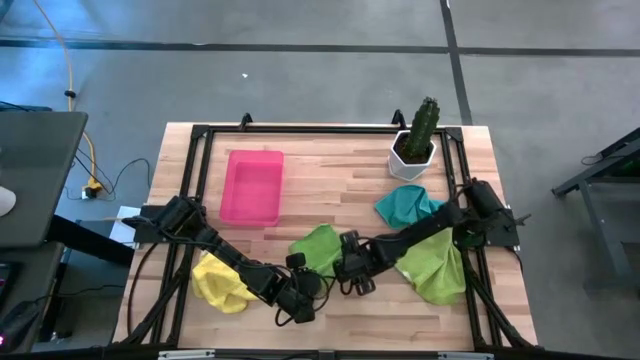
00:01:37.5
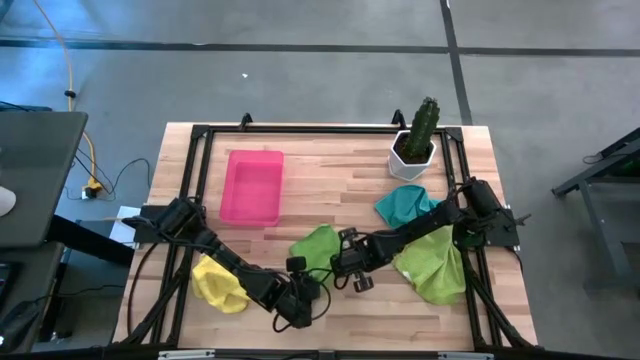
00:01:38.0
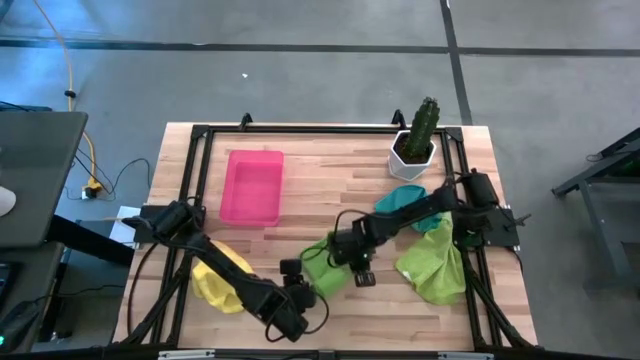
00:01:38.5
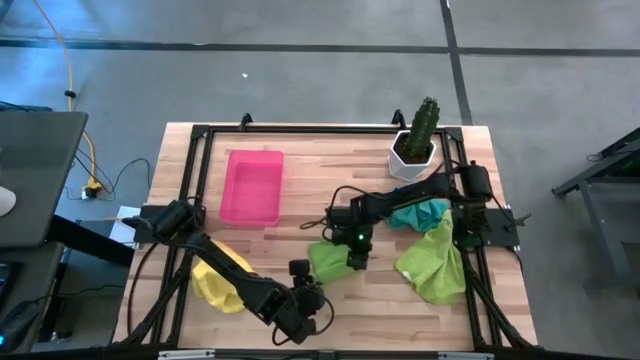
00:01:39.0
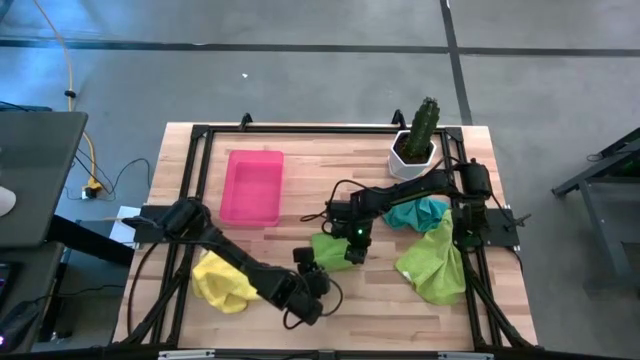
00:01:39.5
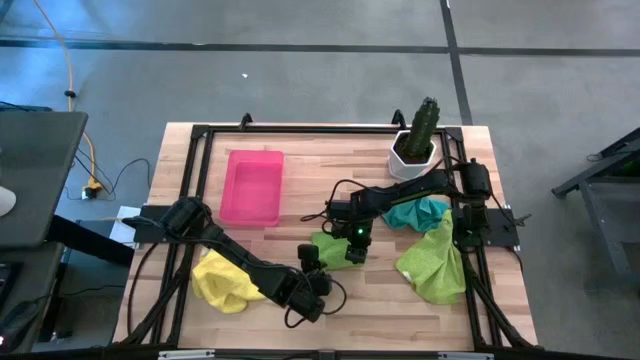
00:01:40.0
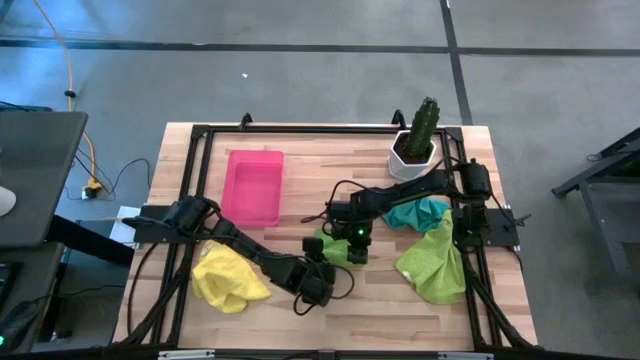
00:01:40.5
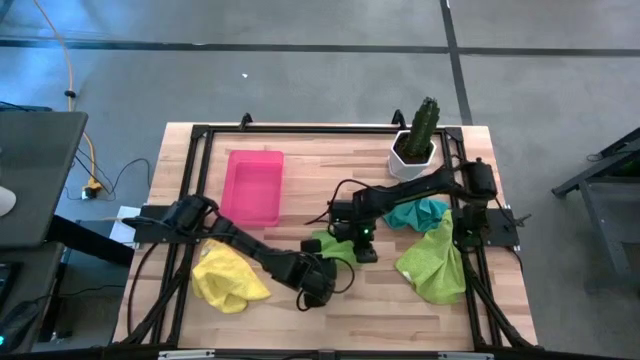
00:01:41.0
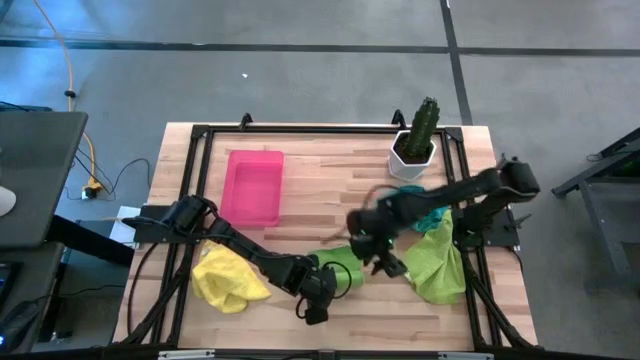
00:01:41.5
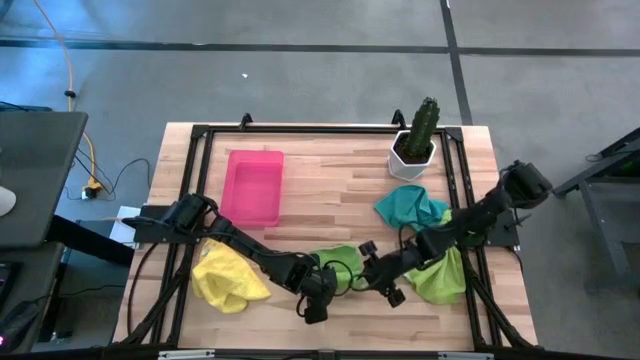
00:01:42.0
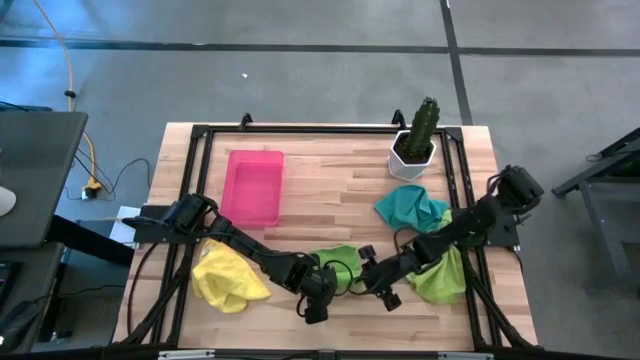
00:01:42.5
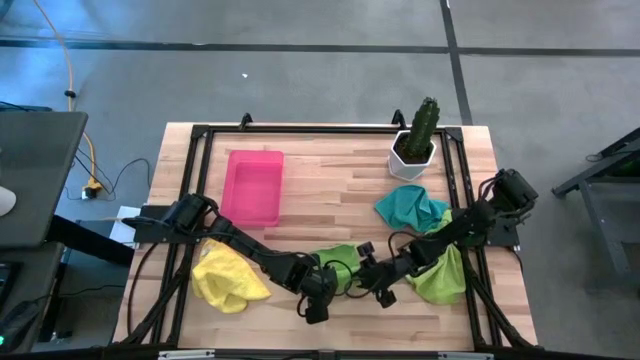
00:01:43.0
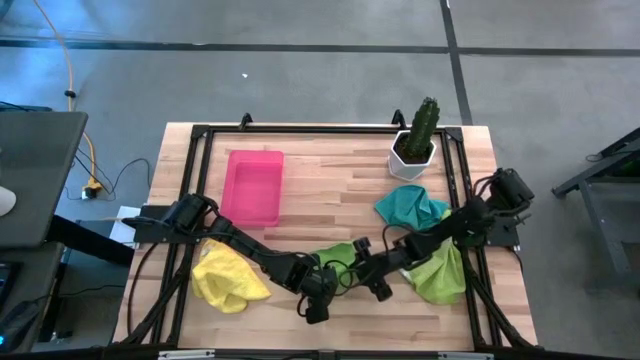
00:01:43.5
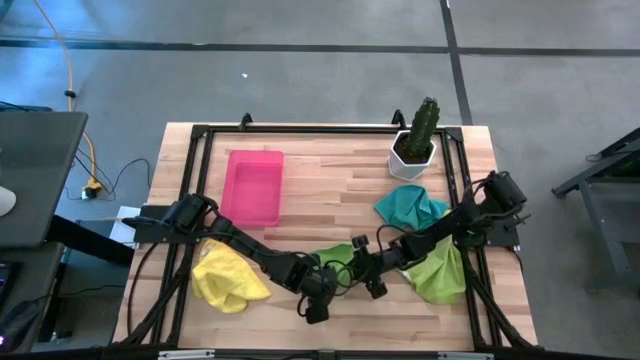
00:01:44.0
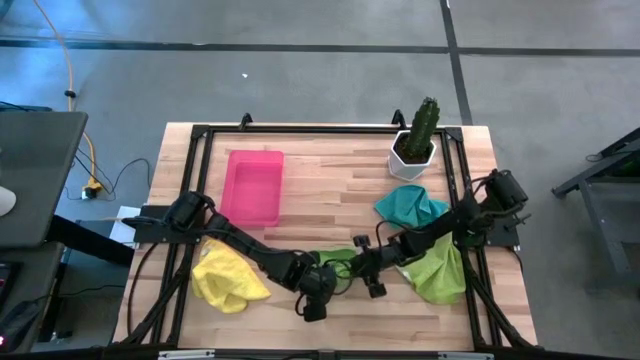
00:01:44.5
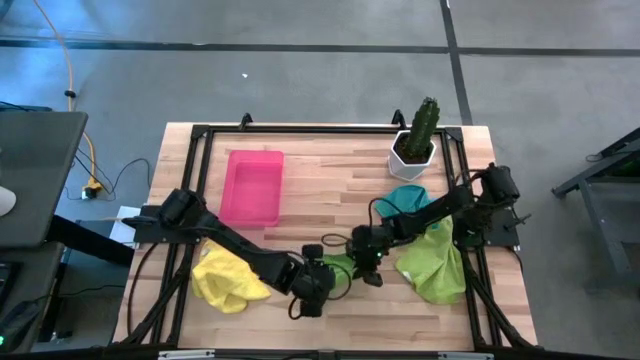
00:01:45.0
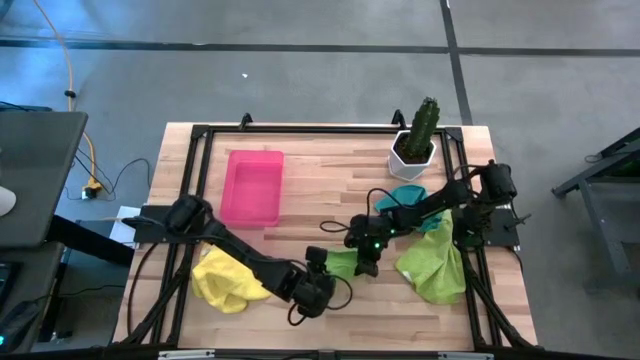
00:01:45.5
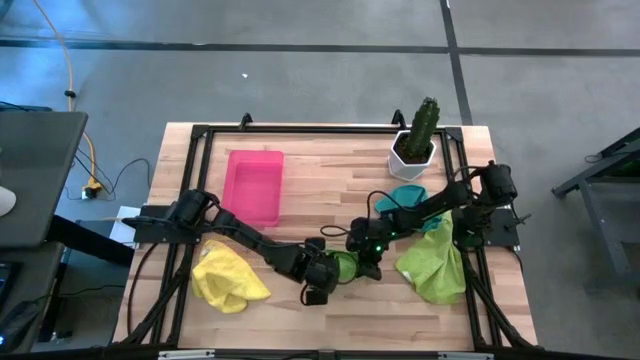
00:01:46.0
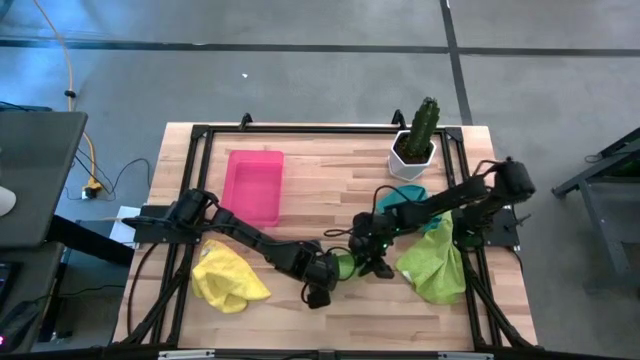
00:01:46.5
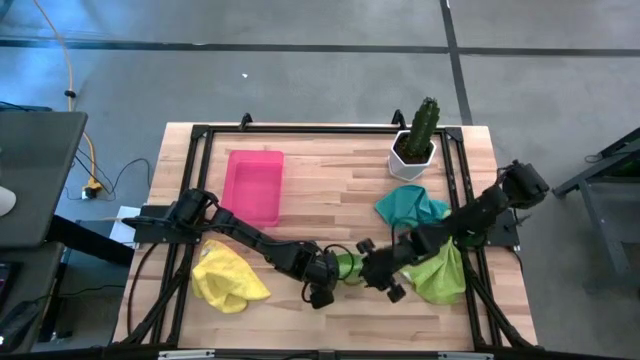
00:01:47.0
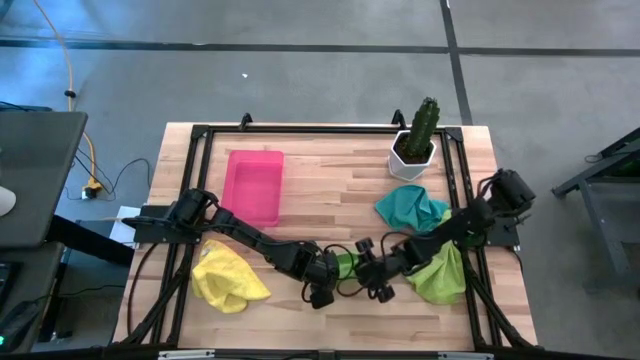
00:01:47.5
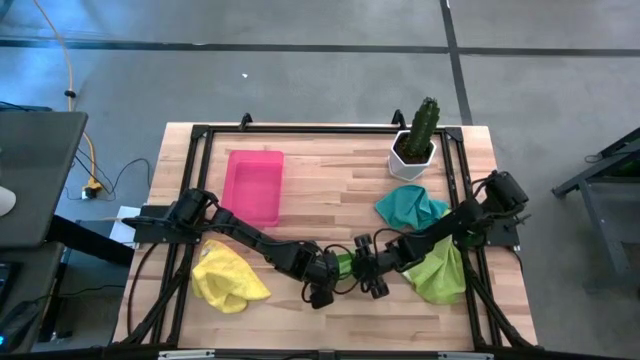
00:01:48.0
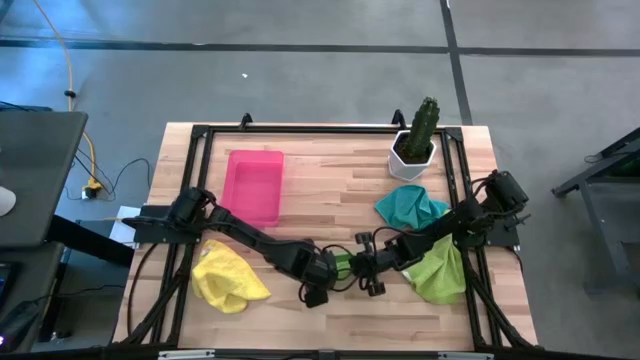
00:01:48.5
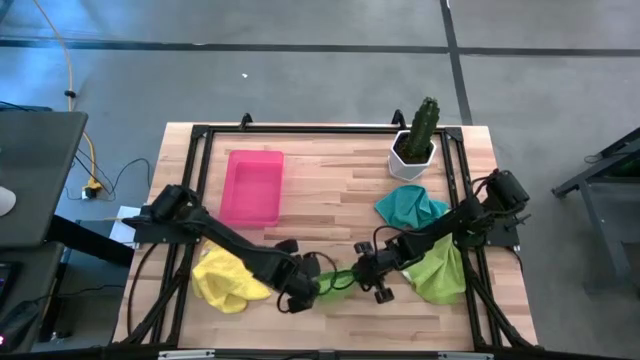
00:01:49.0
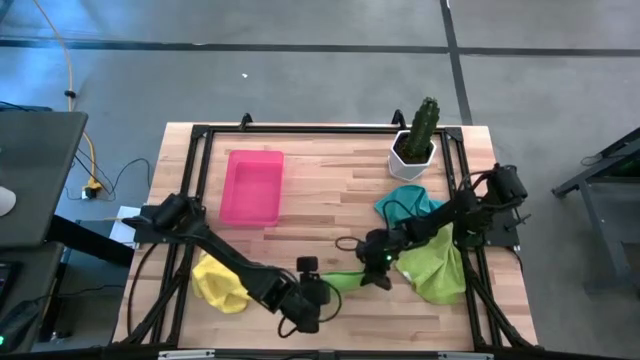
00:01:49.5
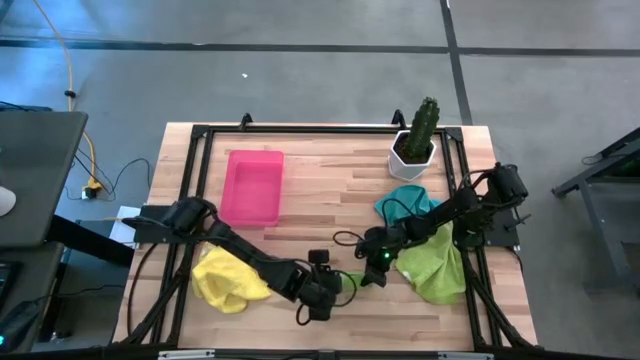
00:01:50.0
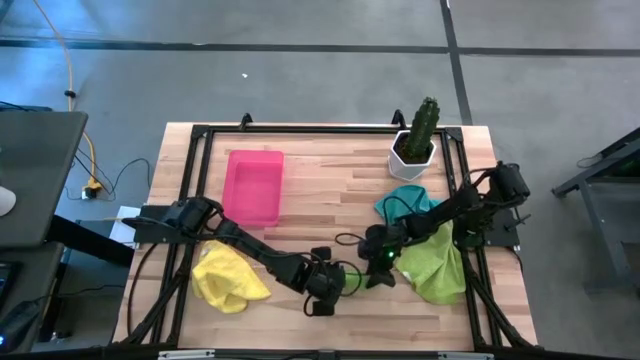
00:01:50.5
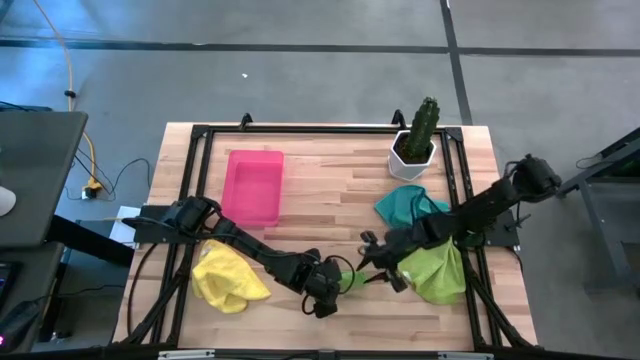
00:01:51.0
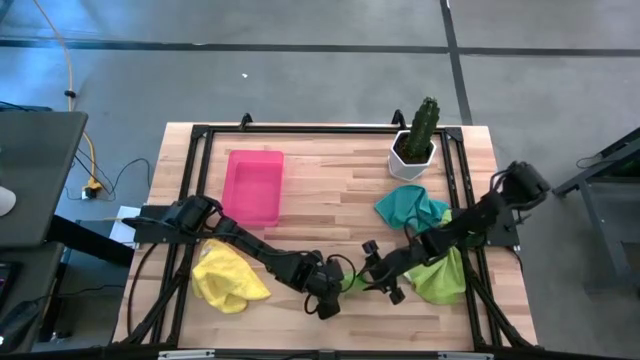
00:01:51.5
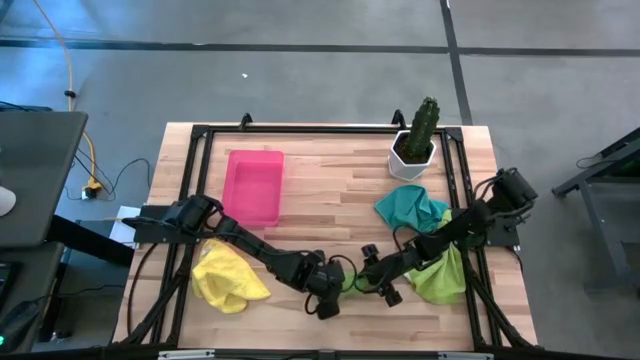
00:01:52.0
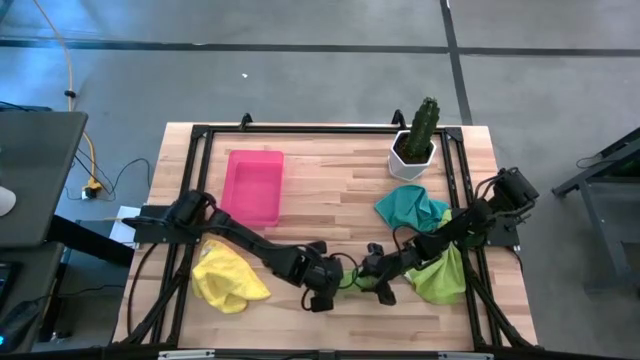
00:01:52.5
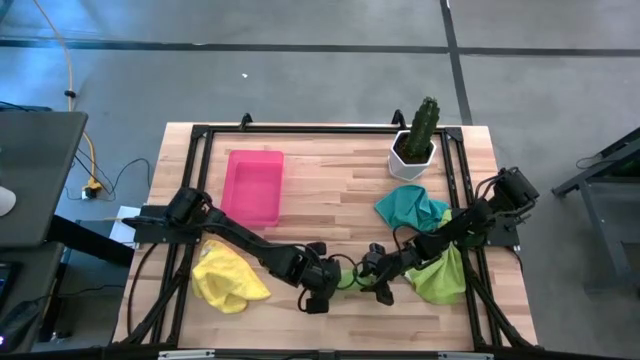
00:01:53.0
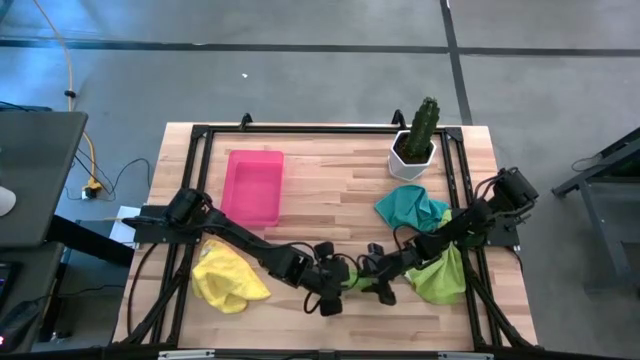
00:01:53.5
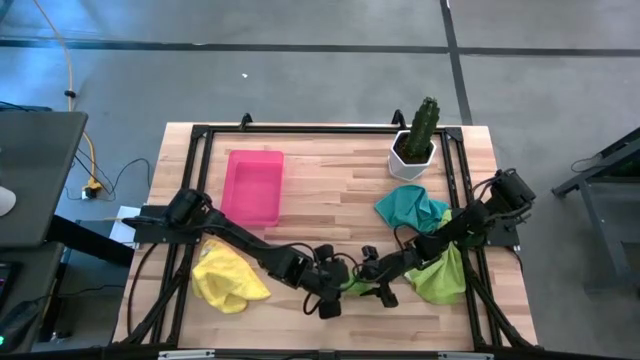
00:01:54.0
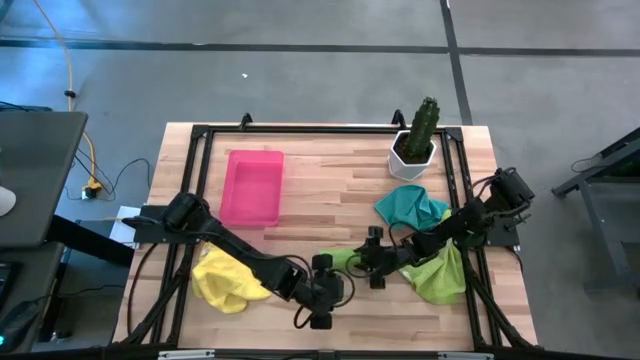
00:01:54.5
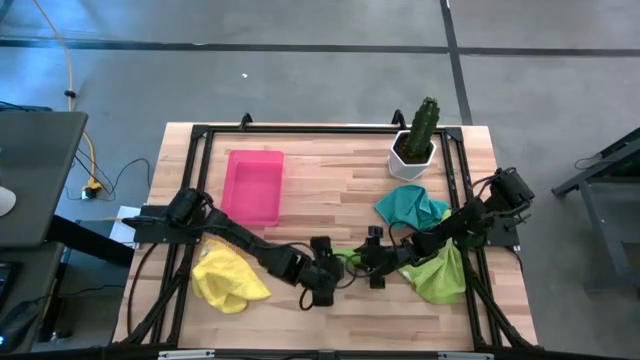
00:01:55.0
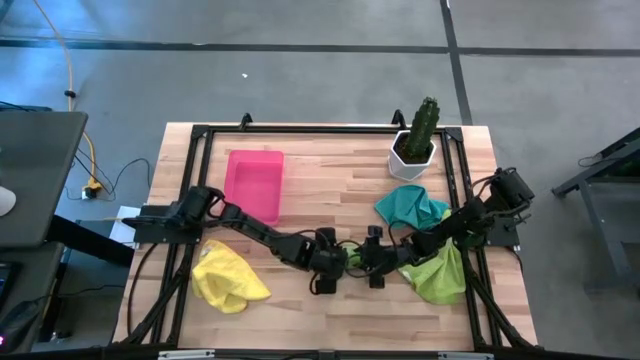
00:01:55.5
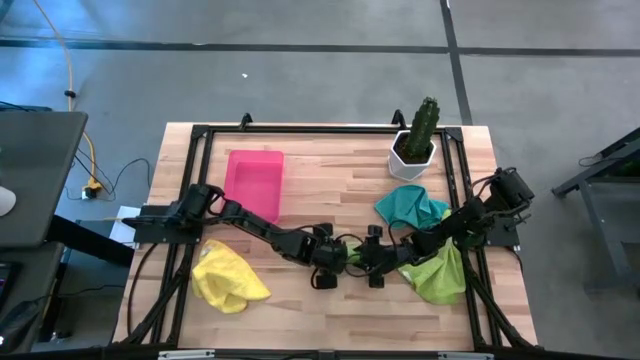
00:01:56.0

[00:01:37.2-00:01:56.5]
Task: Roll microfiber towels into tight, uniform cylinder then place into a basket
Roll the green microfiber cloth

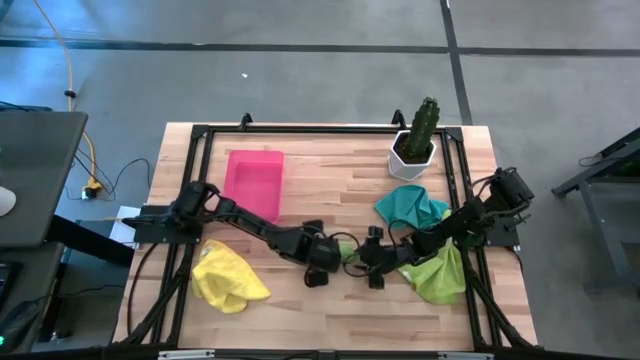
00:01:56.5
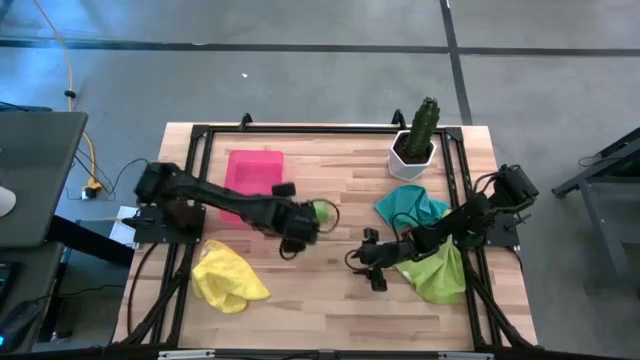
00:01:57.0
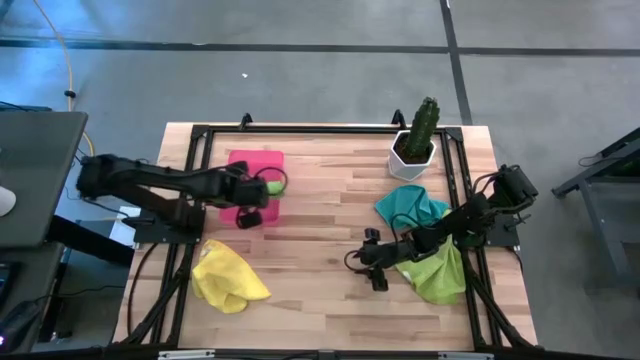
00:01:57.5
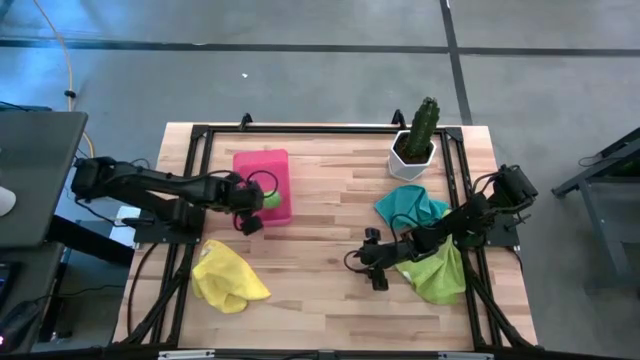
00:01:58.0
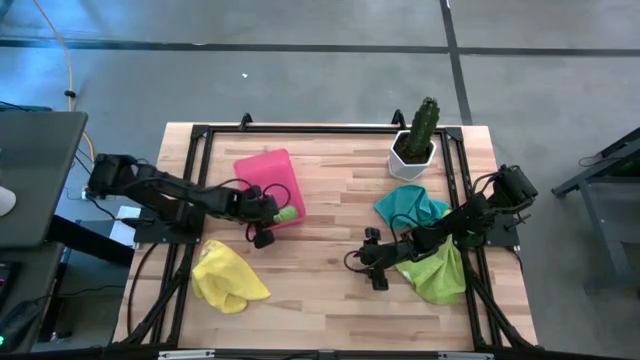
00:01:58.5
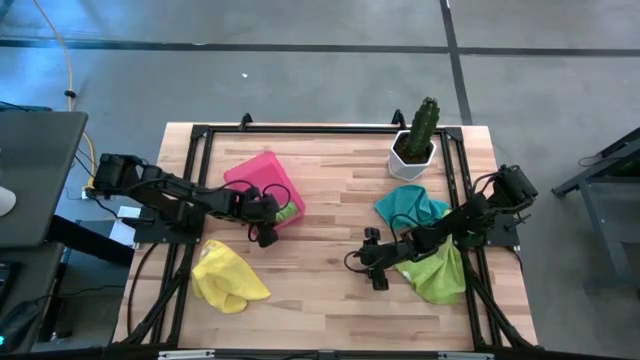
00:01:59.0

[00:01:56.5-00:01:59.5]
Put the rolled green microfiber cloth into the pink bin

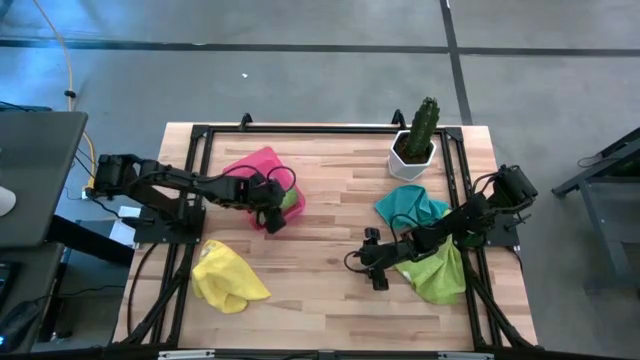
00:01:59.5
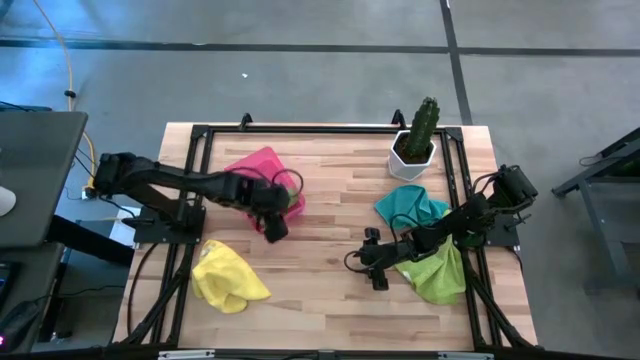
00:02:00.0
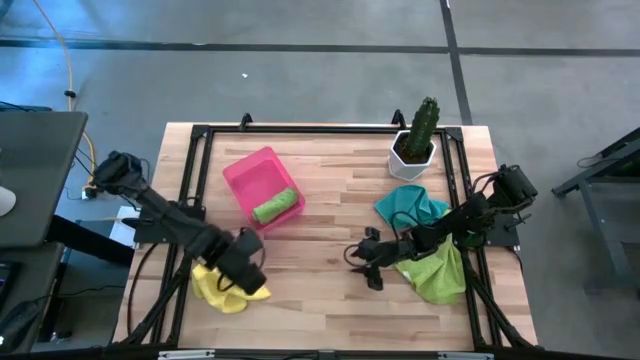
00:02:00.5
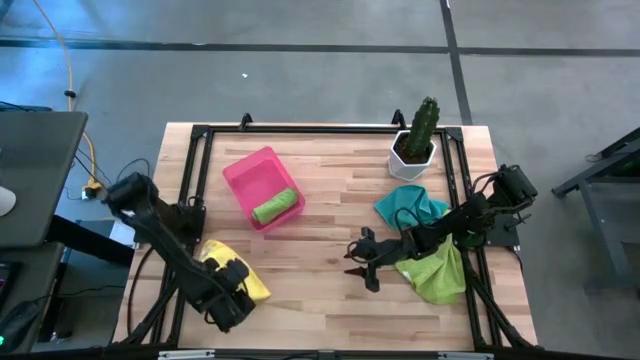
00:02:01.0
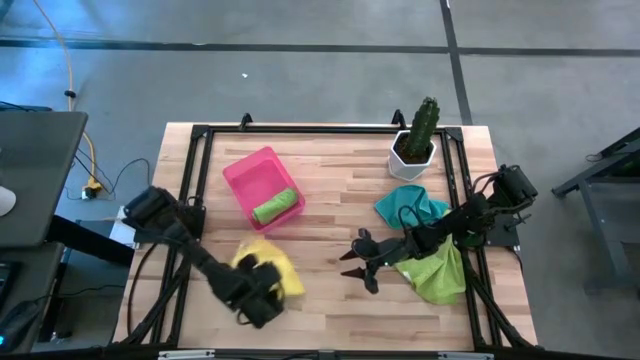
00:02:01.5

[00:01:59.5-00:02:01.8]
Adjust the yellow microfiber cloth
